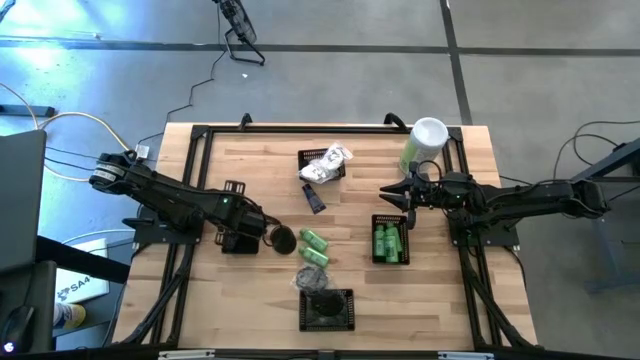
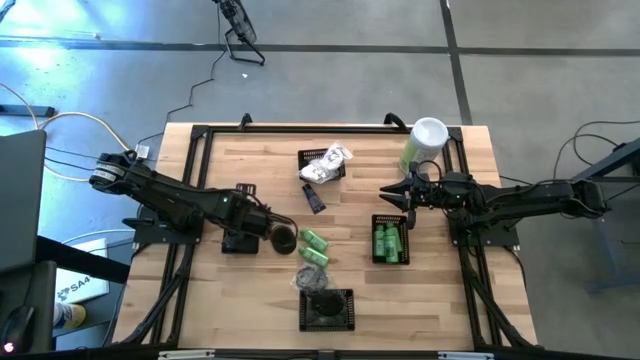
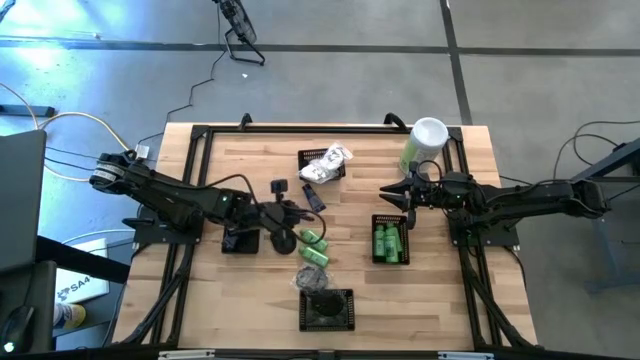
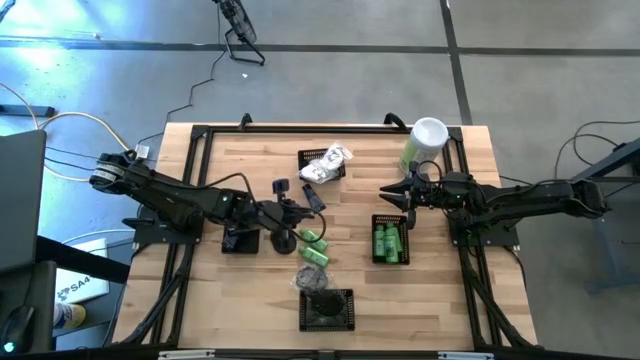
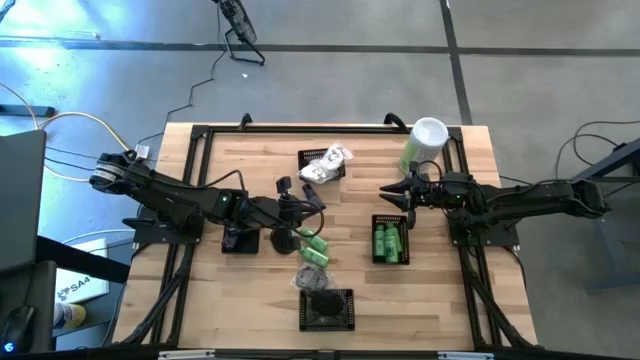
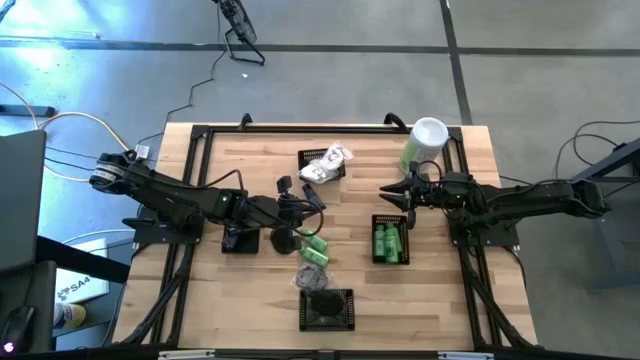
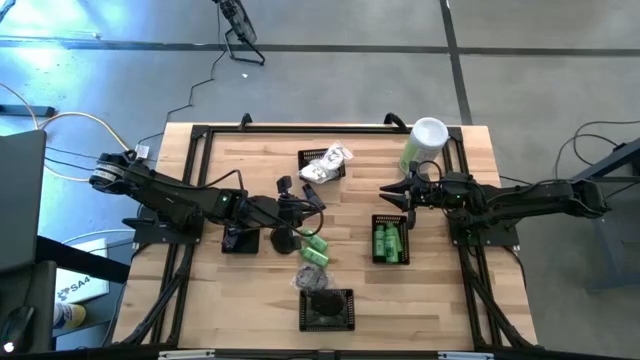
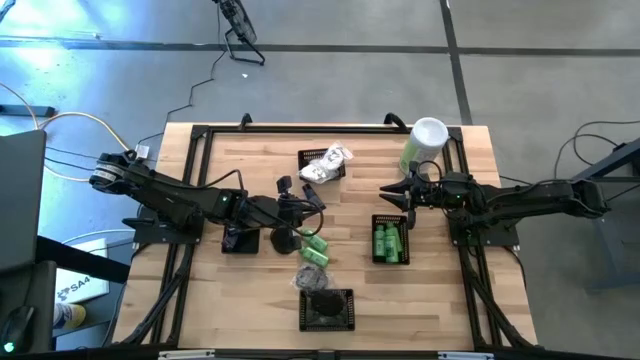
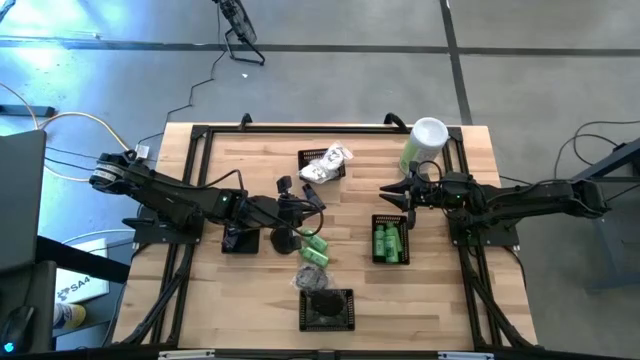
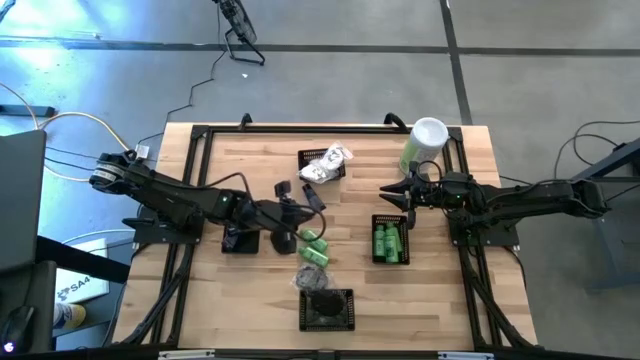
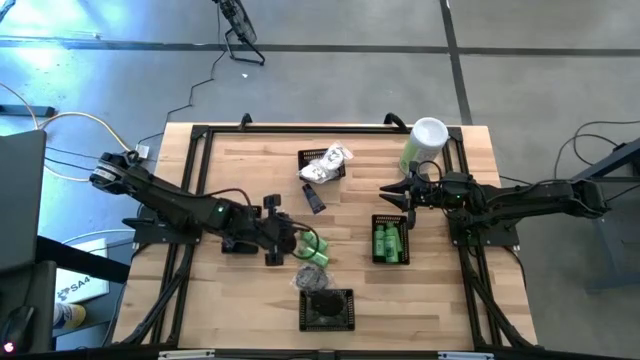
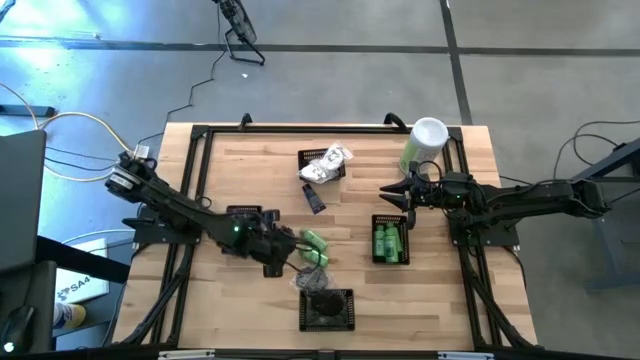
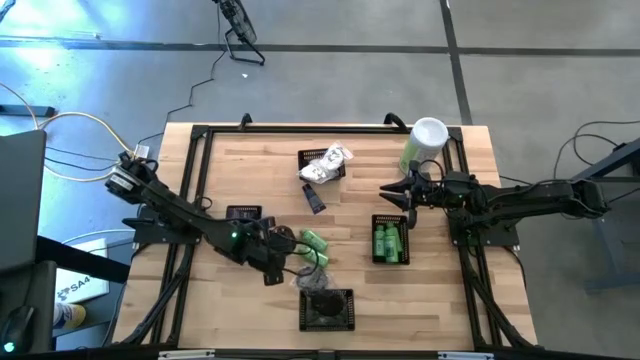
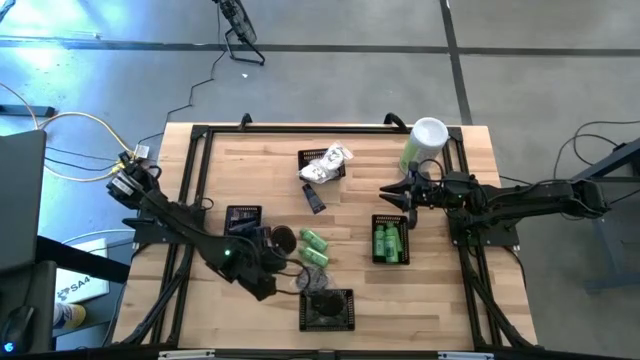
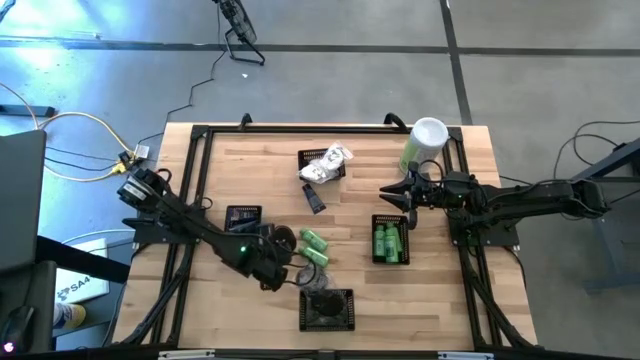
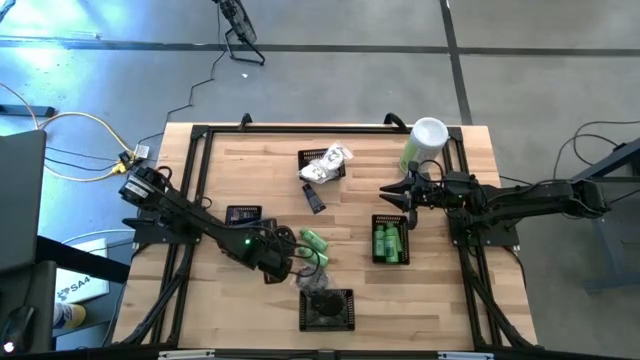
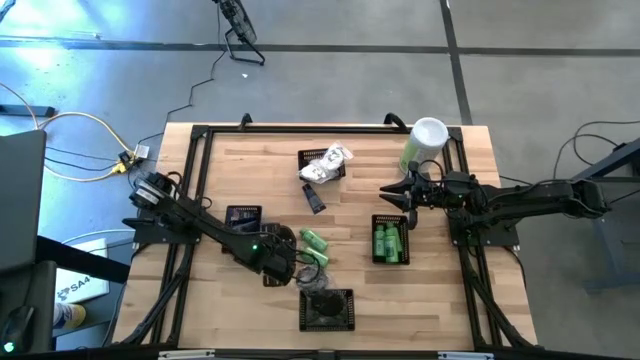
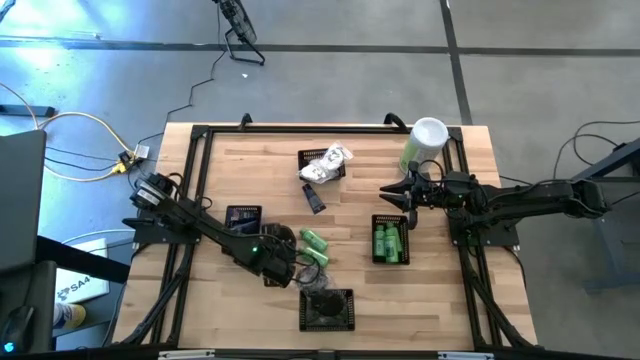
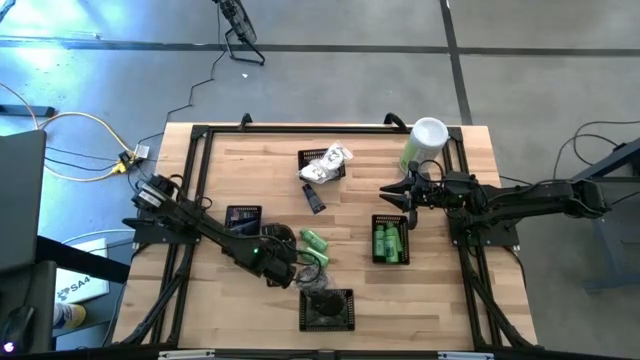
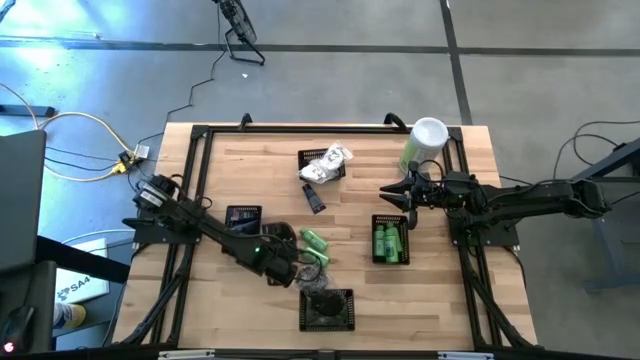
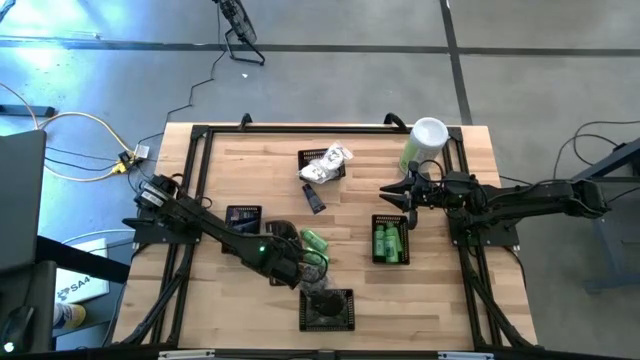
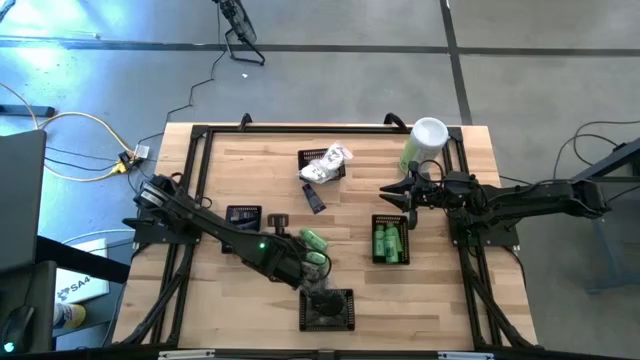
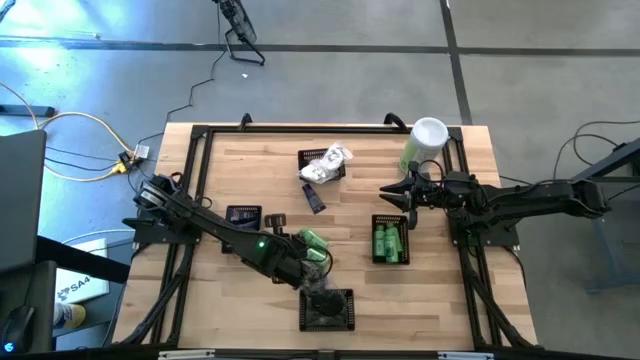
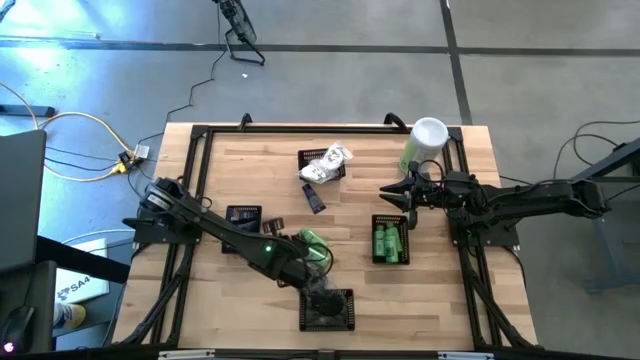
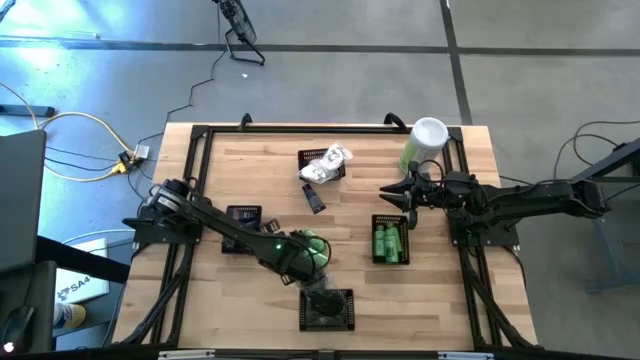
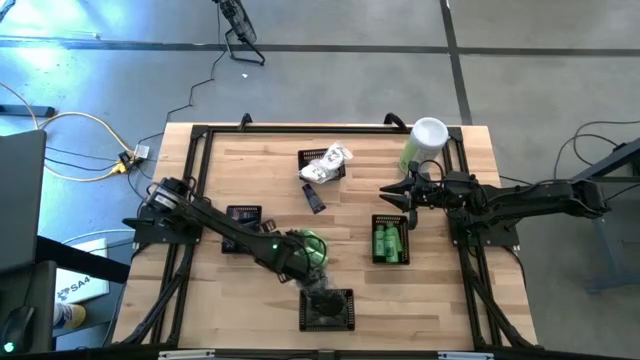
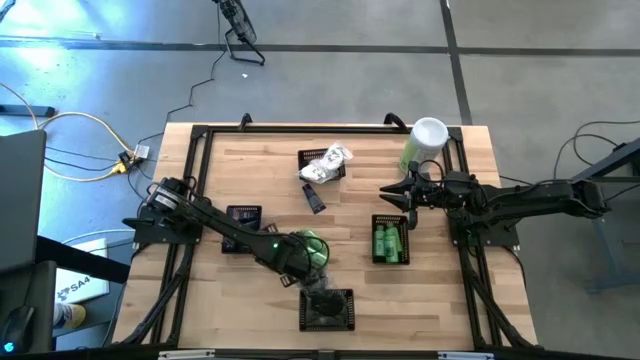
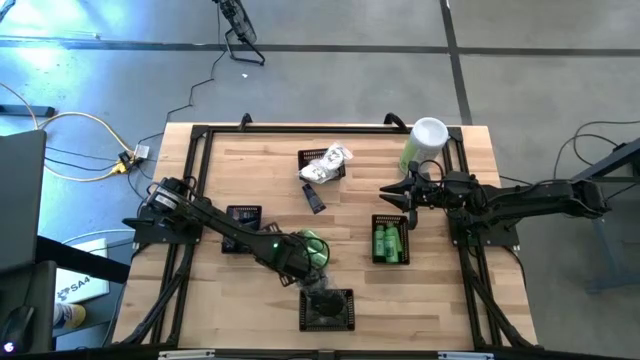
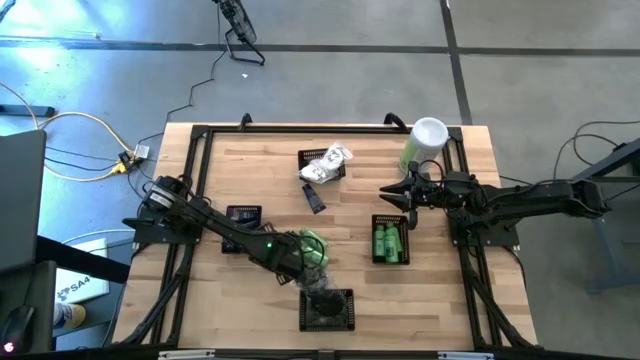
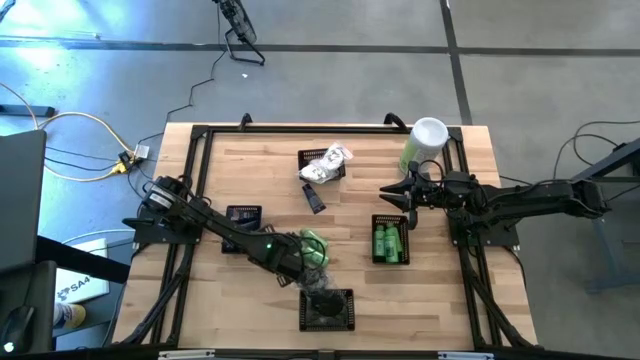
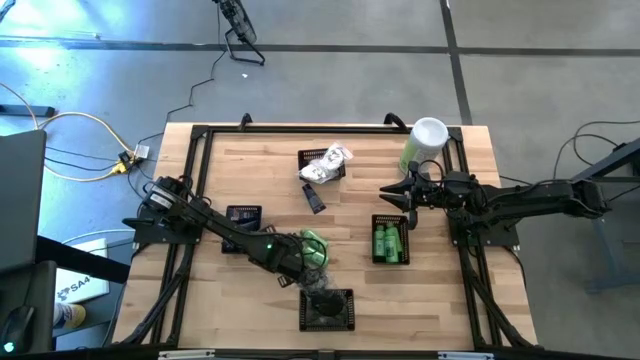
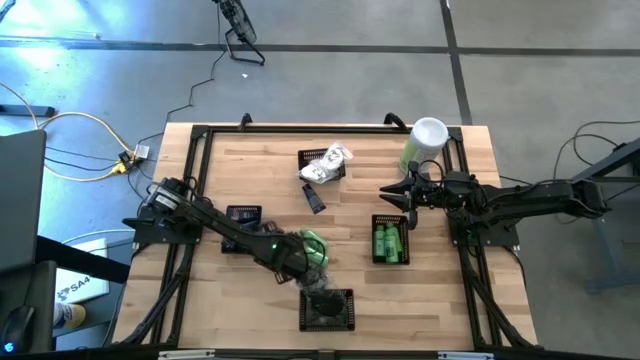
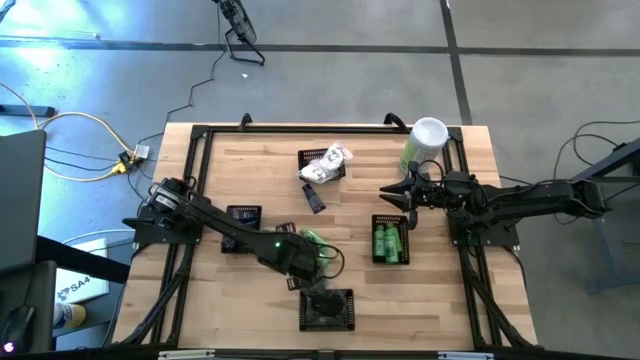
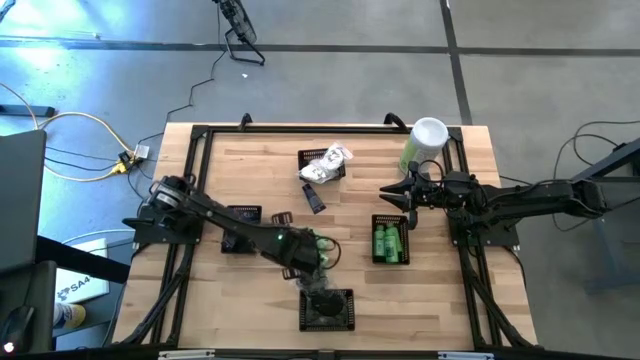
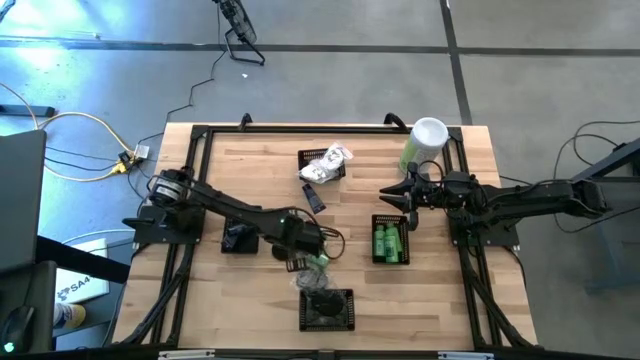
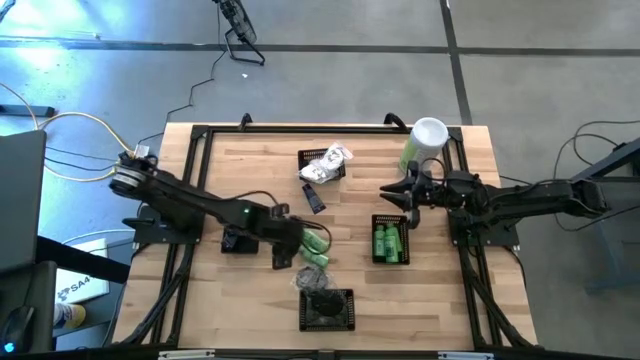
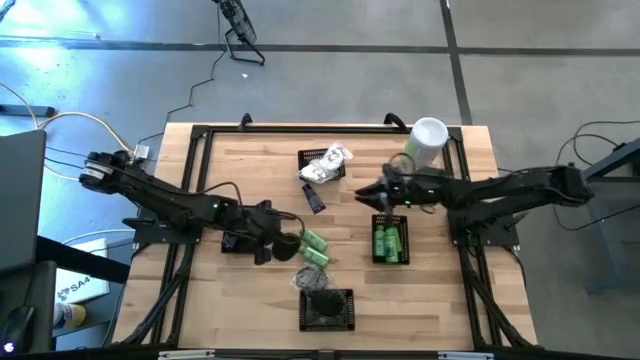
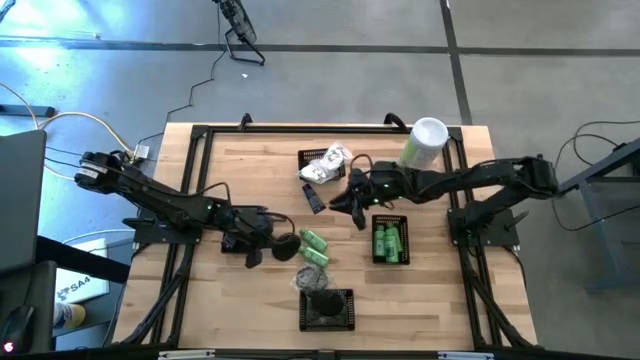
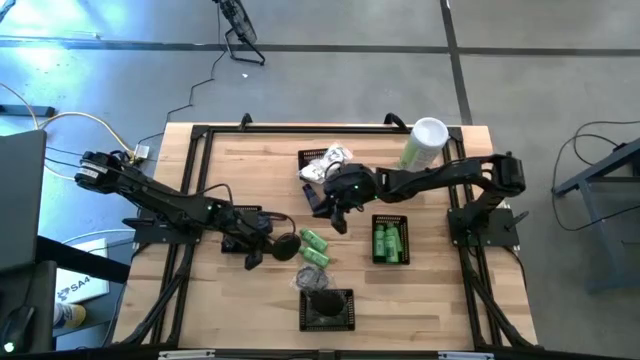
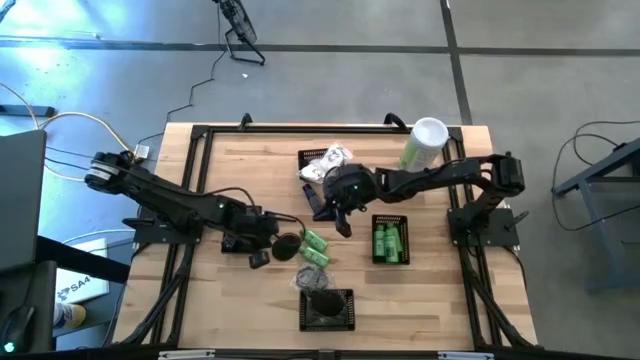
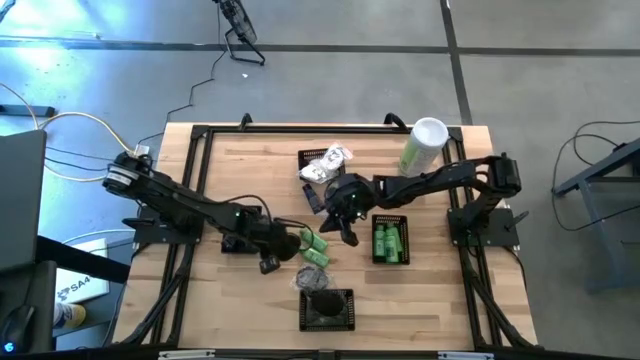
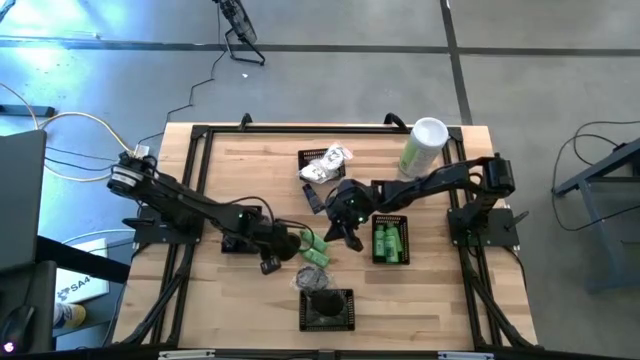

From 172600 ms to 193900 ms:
Task: Pick & Place Travel size toiletries
Put the left black brush into the bottom middle black bin
